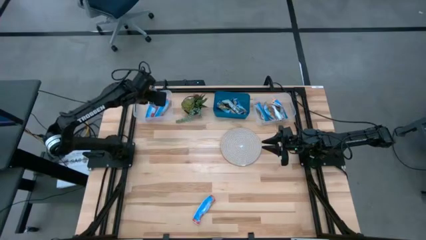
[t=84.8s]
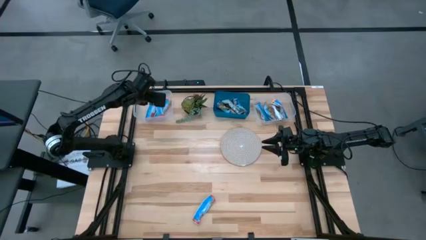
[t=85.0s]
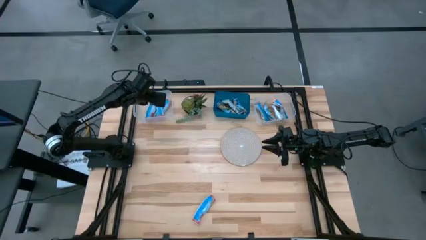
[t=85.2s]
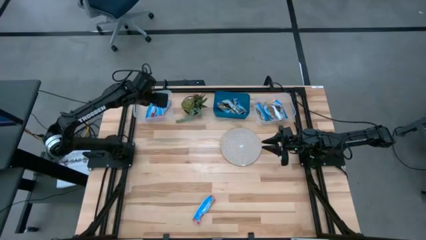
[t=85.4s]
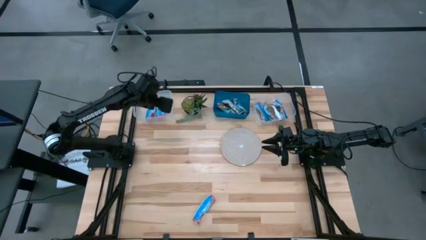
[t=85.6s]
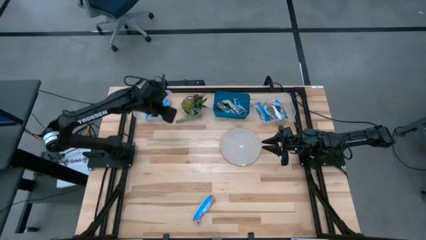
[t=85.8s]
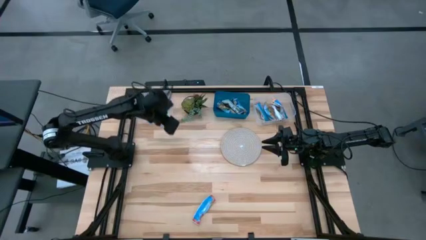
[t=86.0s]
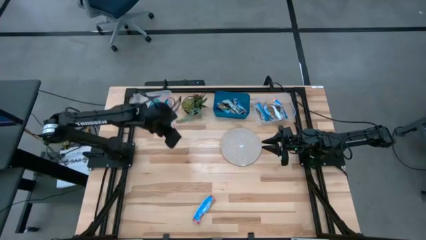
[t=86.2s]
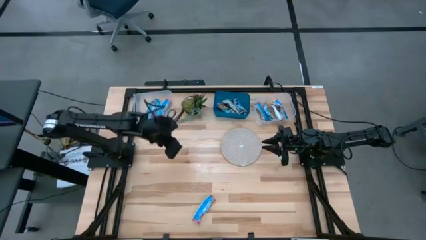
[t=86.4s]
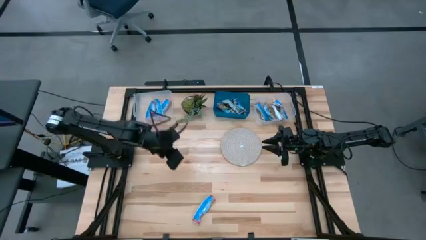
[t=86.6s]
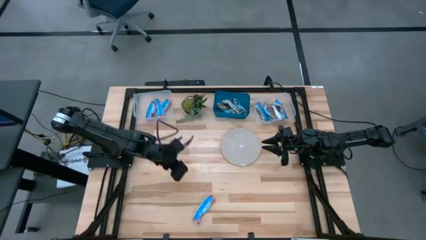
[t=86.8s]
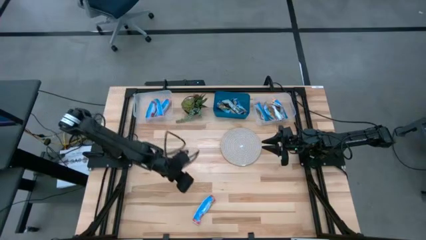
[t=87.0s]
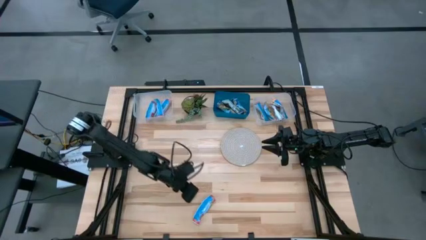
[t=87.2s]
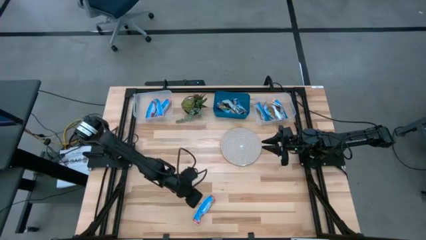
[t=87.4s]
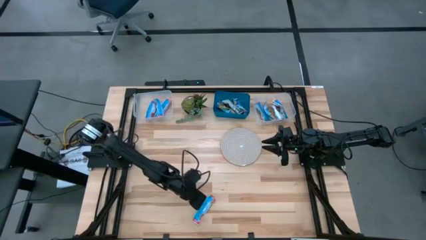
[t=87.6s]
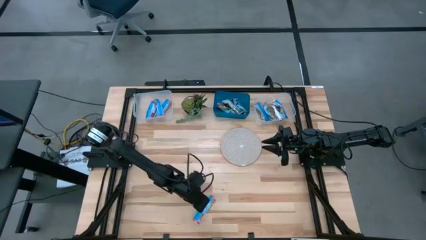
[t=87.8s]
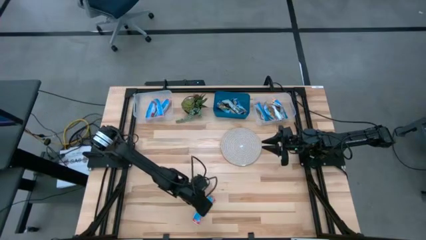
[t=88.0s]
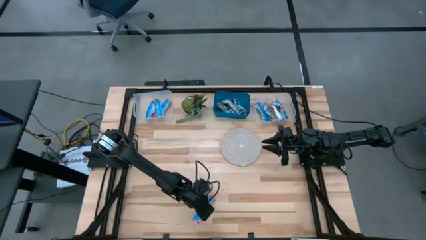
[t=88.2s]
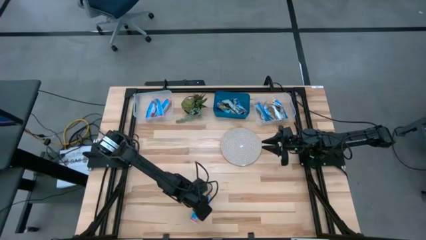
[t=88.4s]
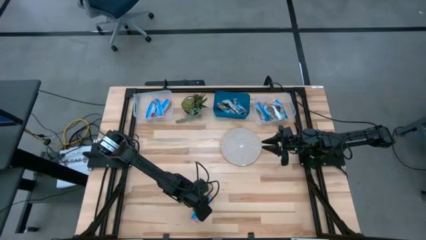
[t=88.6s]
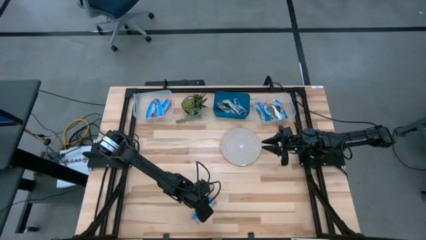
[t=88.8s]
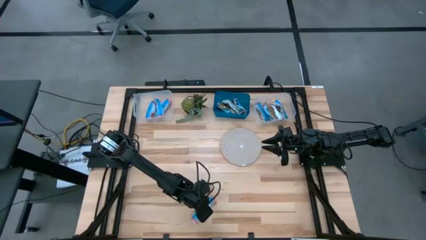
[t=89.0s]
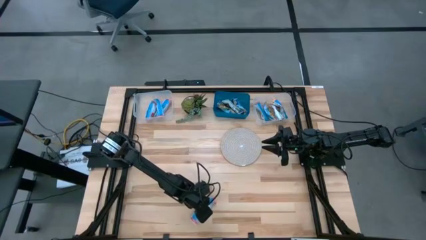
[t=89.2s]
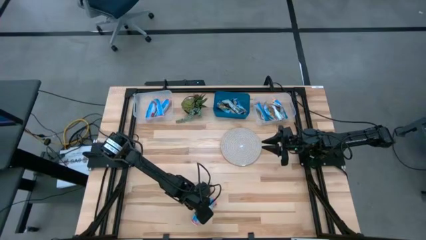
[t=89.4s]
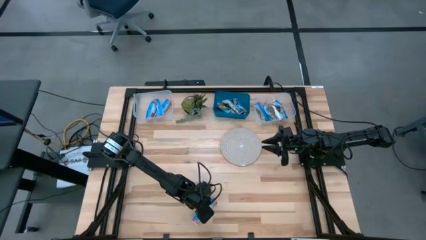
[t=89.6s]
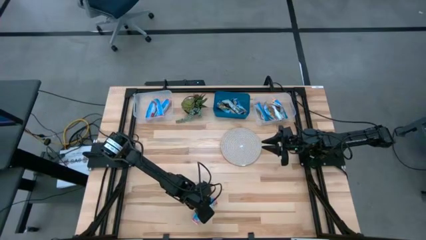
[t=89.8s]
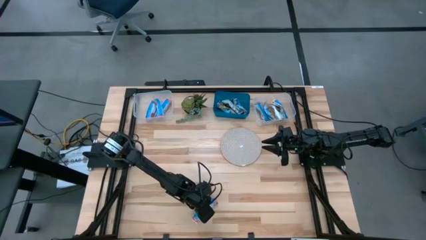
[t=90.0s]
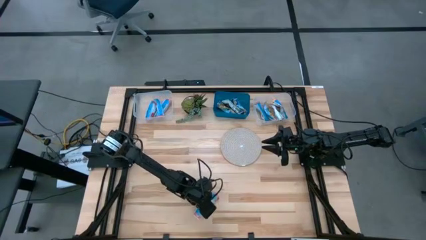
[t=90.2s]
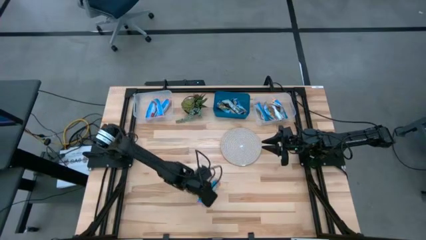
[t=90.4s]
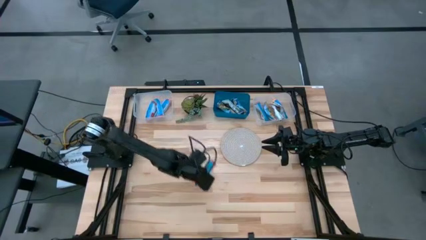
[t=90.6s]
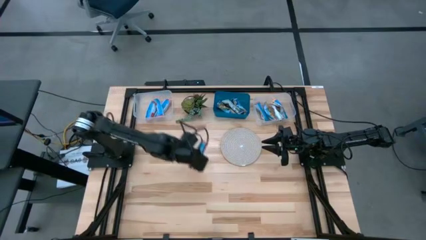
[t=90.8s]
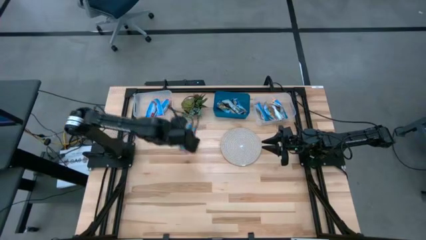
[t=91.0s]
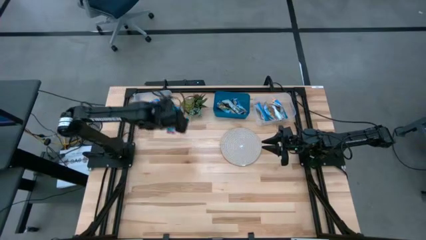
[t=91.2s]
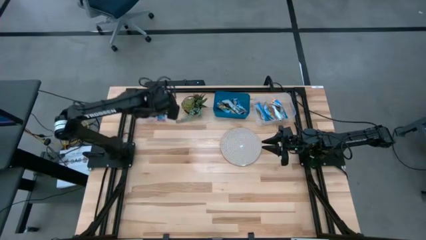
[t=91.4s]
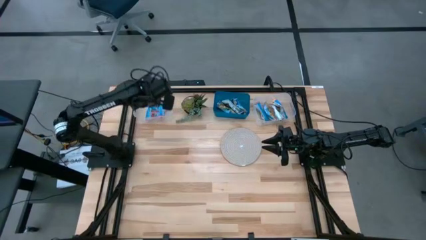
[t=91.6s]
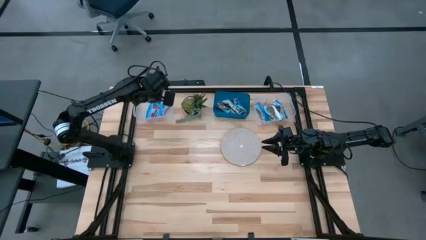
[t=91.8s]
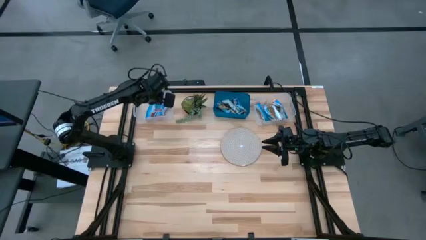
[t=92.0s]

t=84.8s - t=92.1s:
Task: Pick and place Granola Bars by type
Put the red granola bar into the left transparent bin

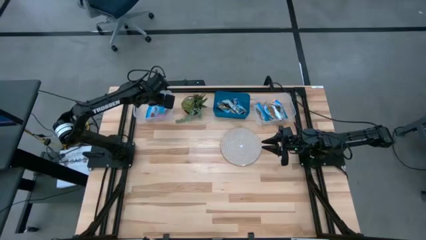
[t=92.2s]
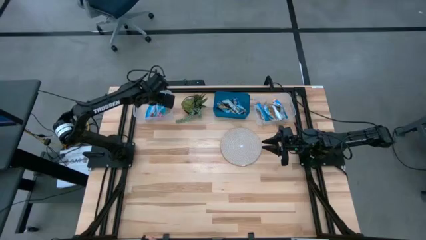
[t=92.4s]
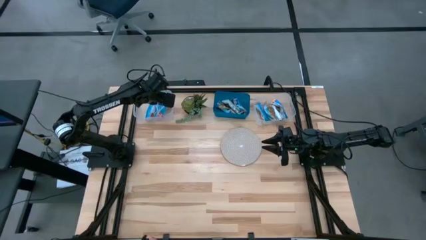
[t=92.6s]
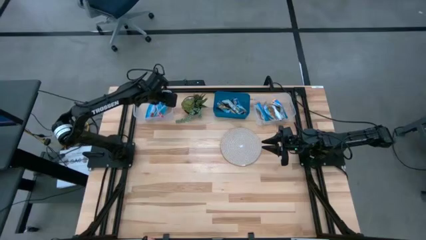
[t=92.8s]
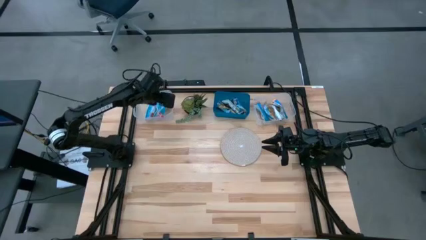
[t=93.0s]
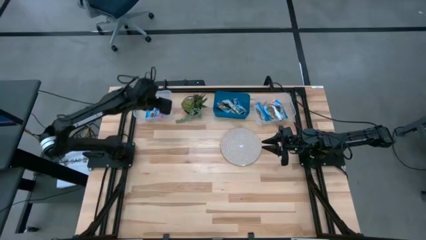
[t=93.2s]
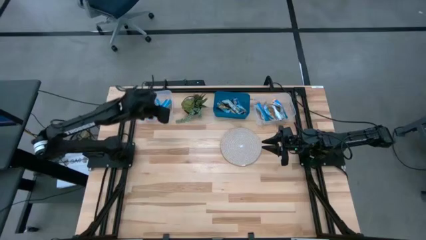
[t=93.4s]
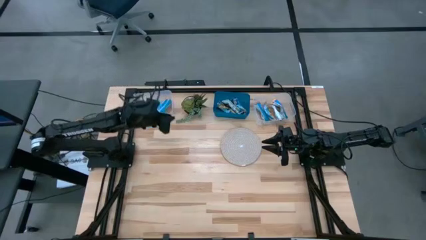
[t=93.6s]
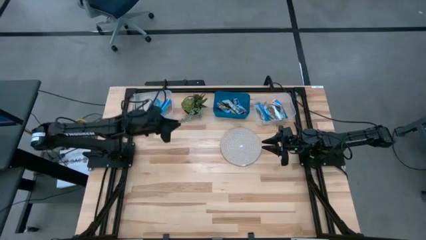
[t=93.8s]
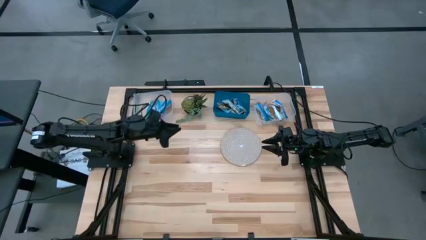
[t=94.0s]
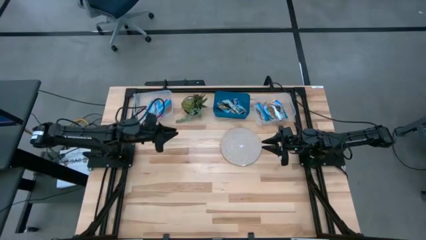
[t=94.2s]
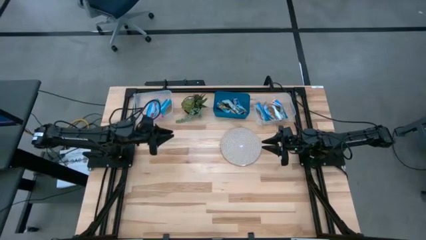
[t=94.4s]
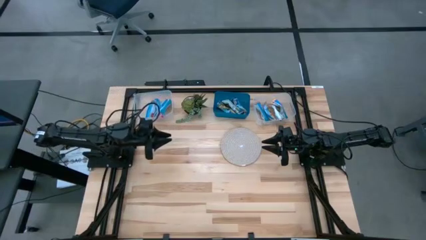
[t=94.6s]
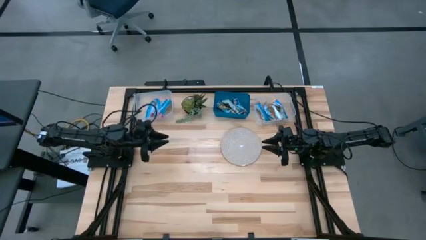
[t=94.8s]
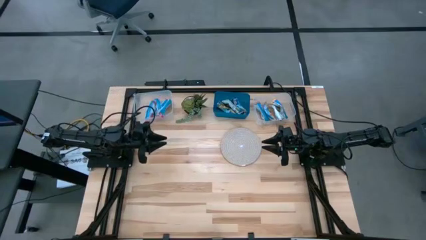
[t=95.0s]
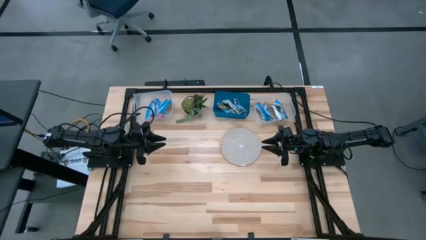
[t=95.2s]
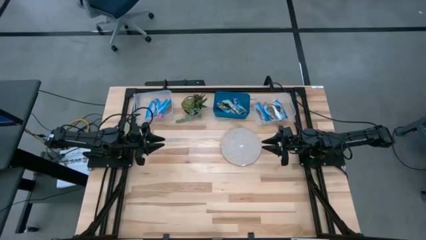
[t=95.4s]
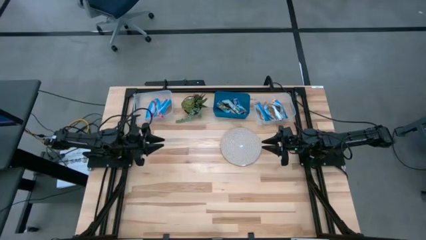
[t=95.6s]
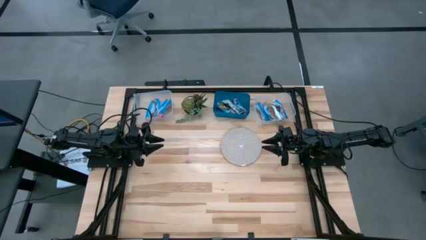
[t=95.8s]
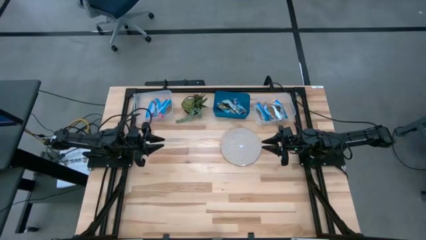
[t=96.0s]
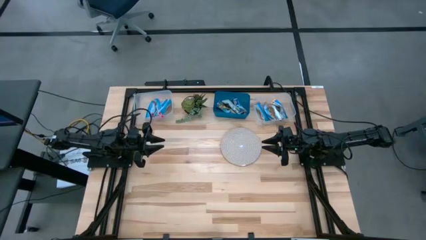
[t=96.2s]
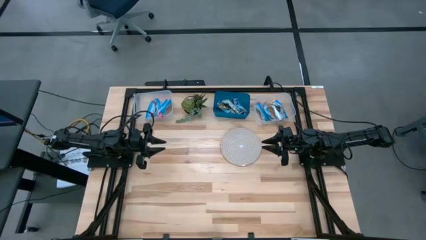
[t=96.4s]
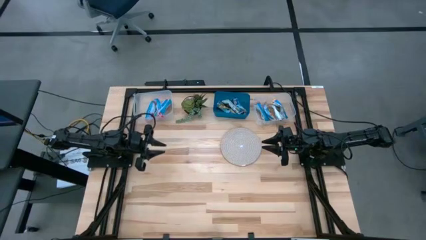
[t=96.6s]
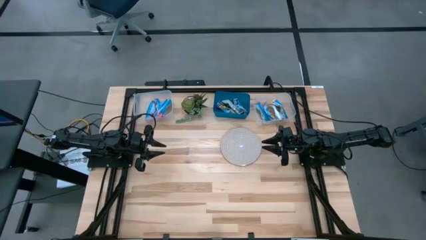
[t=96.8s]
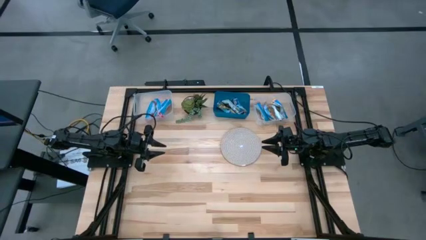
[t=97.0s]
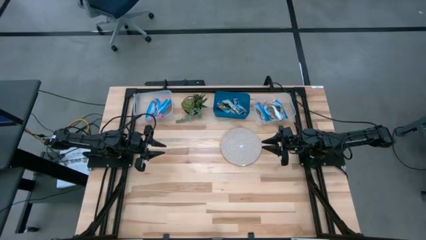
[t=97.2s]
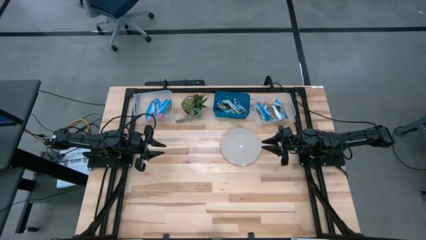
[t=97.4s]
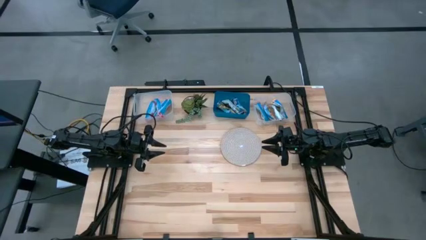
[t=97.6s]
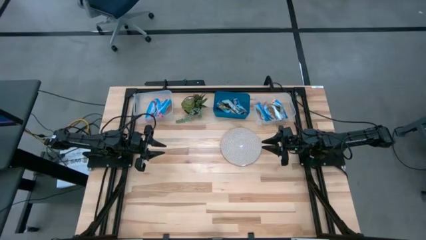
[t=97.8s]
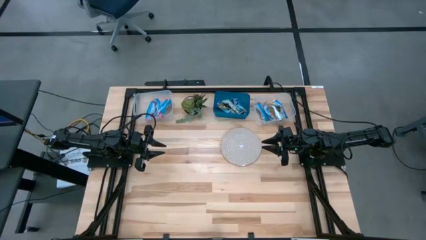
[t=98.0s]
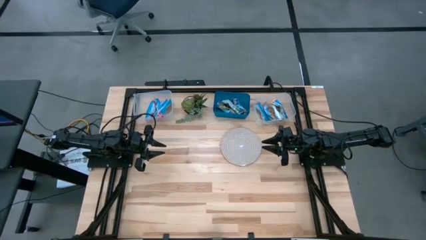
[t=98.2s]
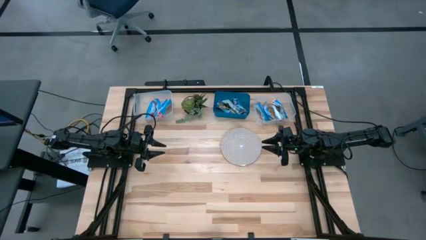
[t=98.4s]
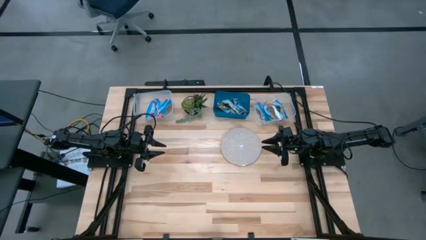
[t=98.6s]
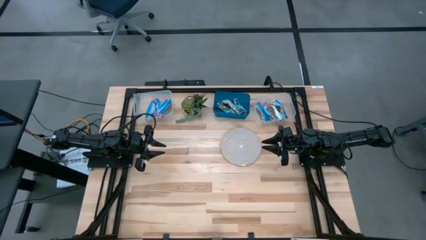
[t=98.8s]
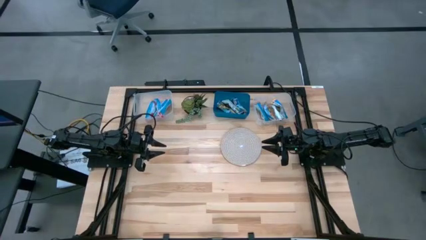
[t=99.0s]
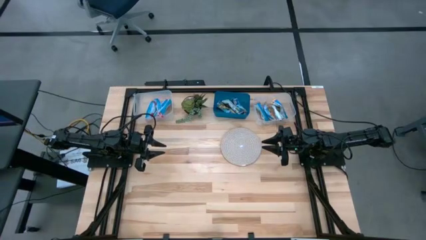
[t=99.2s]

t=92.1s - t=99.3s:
Return to Home Position

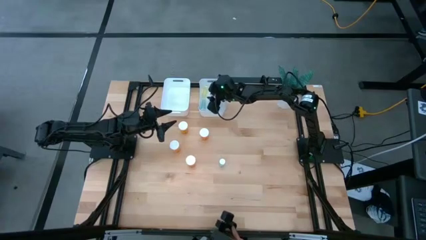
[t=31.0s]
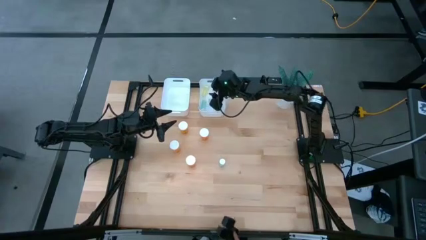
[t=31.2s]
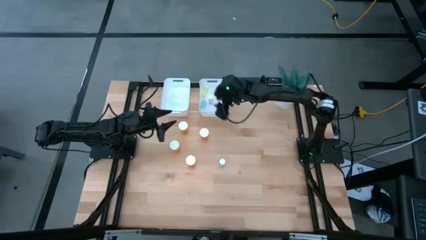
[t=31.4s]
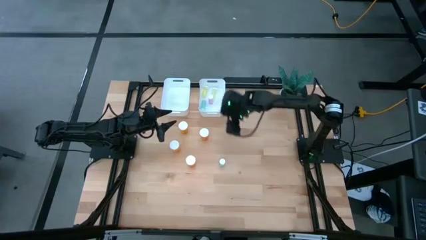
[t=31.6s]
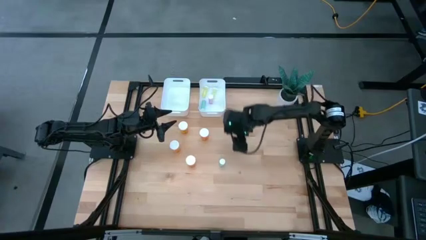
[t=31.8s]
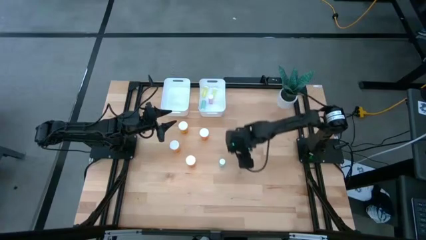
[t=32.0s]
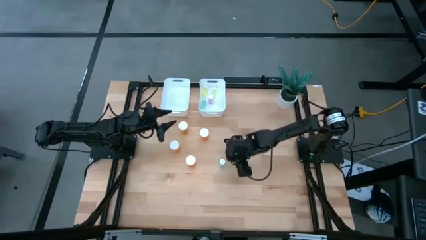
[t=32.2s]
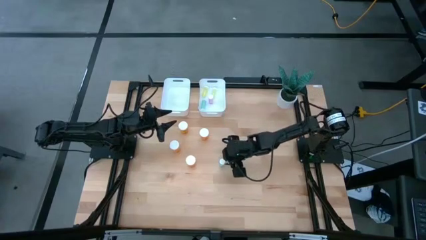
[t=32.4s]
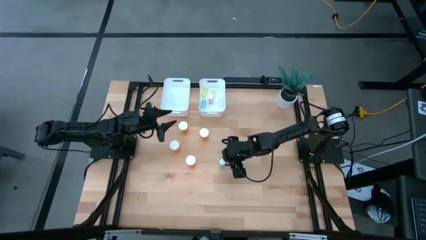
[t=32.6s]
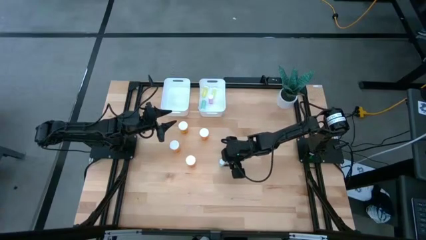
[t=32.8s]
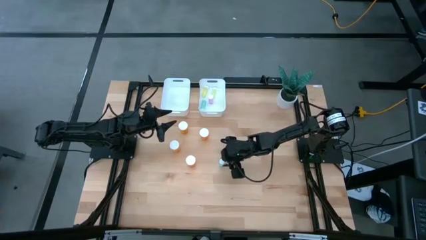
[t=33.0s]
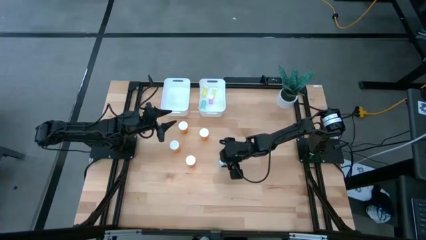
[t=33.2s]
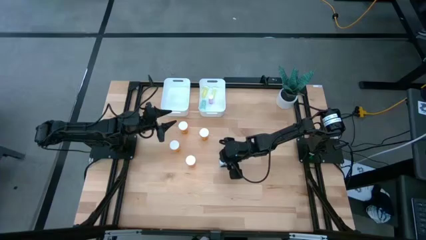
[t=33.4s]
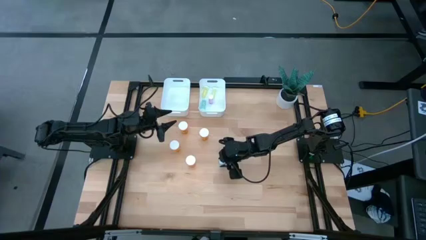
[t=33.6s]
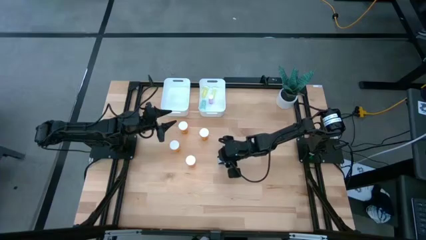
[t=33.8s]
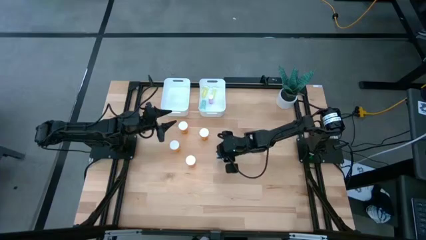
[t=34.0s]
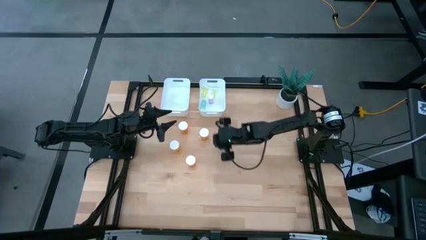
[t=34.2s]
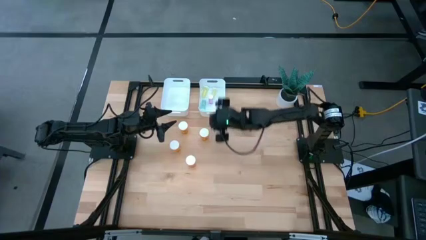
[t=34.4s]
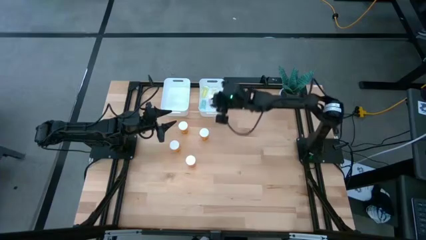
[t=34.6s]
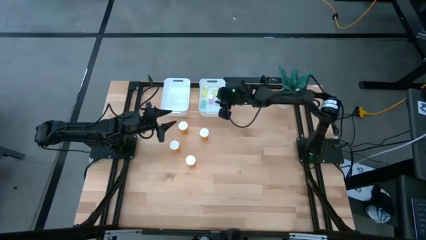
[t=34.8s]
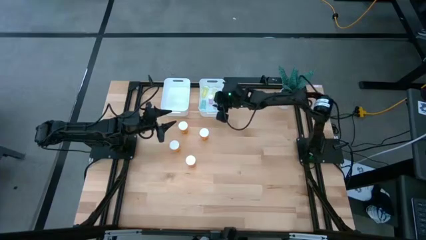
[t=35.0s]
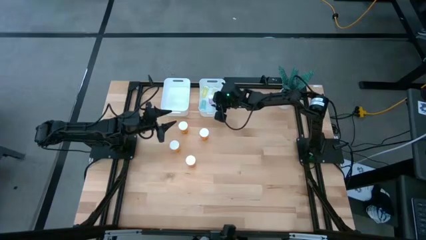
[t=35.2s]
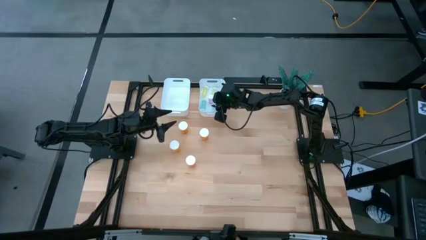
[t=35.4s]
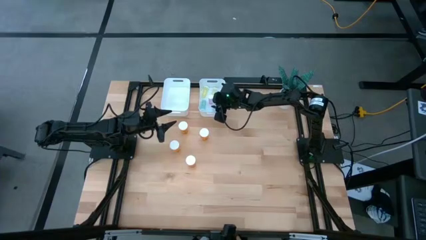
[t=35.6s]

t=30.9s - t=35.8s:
Task: Pick and place medicine bottles into bin by pill shape (circle, oval)
Put the small blue pill bottle into the right white bin
